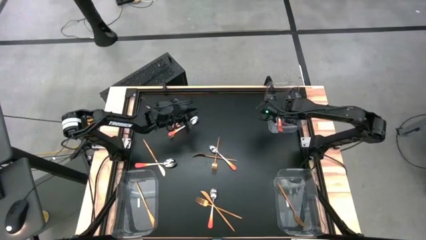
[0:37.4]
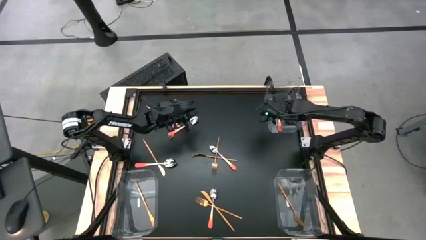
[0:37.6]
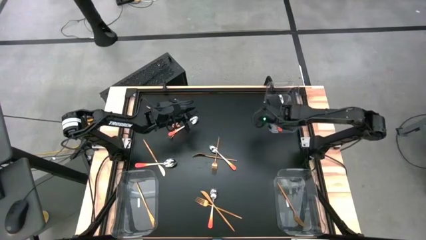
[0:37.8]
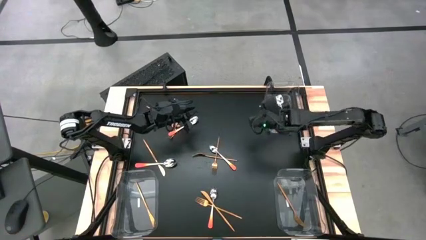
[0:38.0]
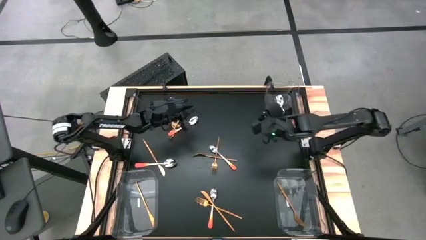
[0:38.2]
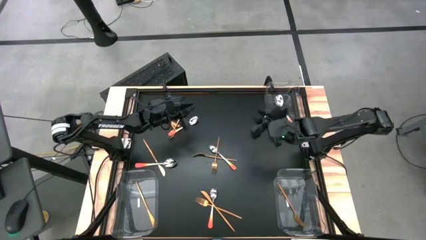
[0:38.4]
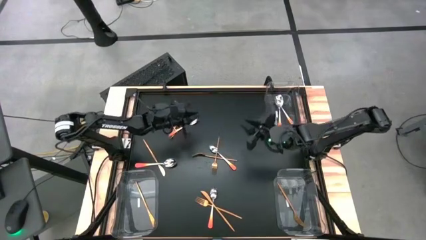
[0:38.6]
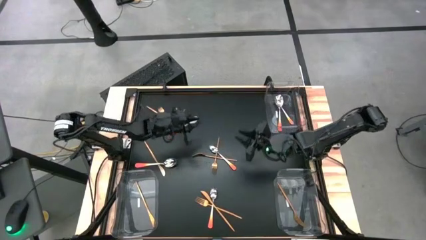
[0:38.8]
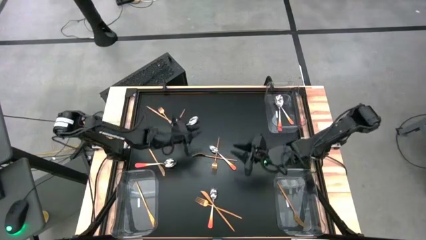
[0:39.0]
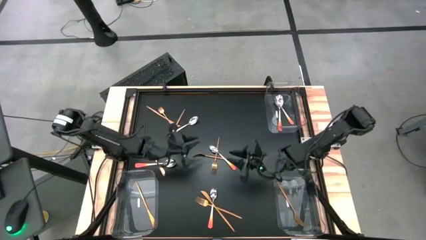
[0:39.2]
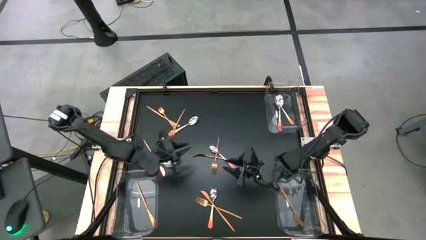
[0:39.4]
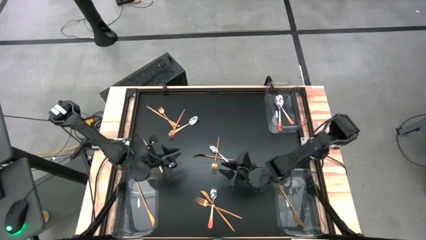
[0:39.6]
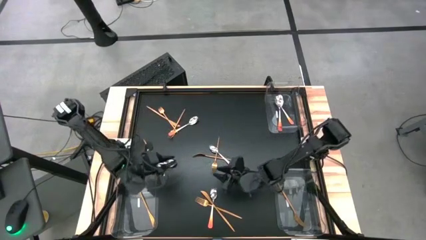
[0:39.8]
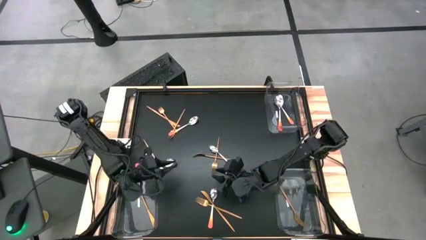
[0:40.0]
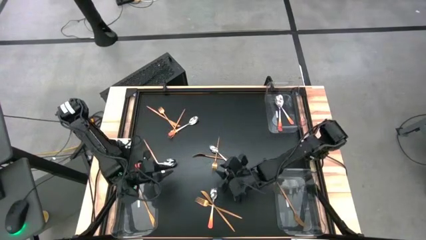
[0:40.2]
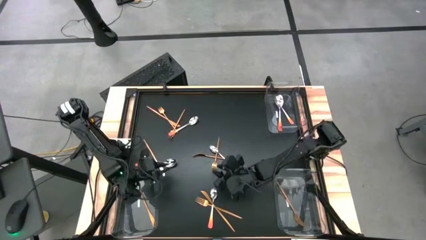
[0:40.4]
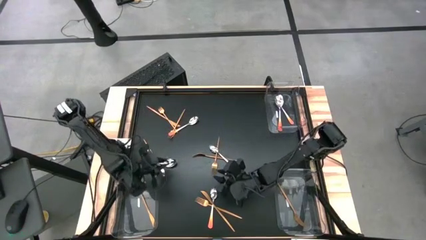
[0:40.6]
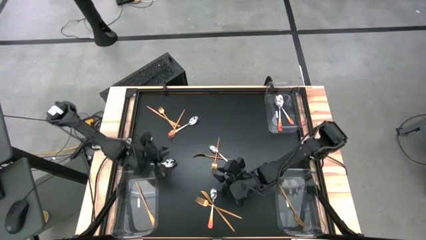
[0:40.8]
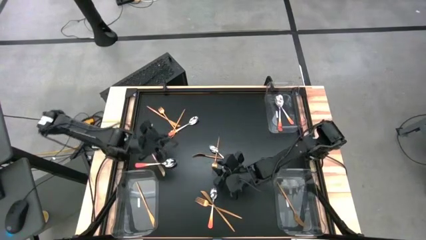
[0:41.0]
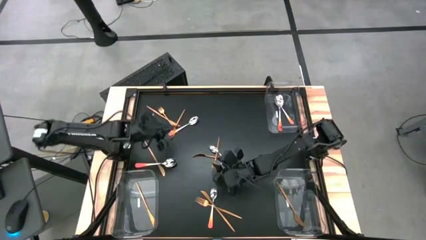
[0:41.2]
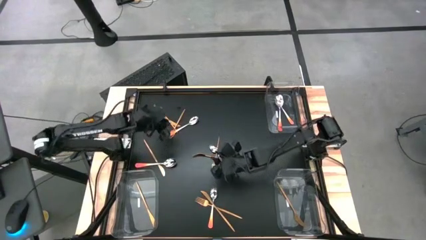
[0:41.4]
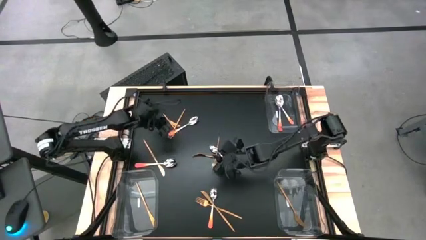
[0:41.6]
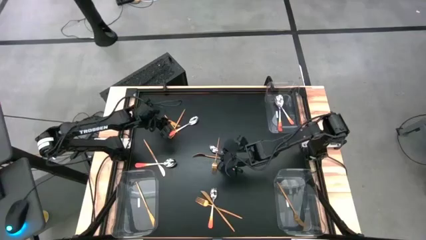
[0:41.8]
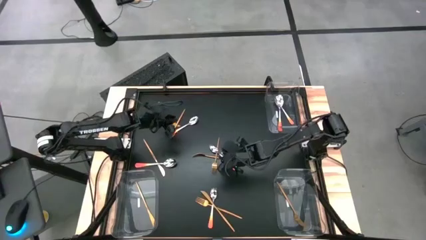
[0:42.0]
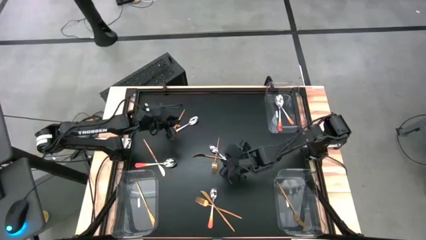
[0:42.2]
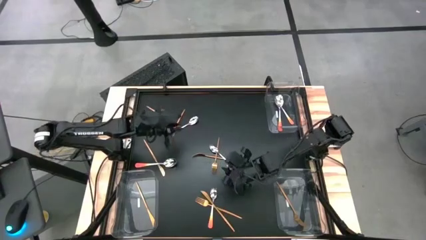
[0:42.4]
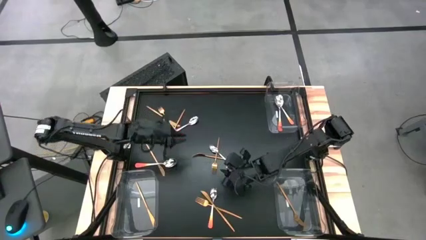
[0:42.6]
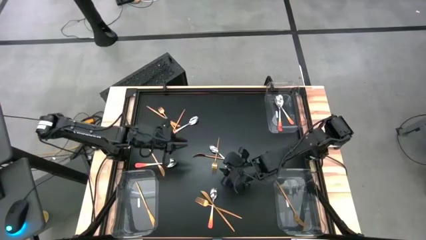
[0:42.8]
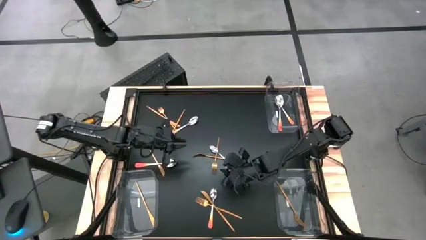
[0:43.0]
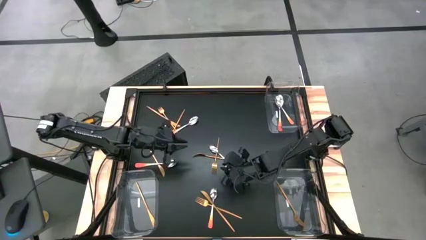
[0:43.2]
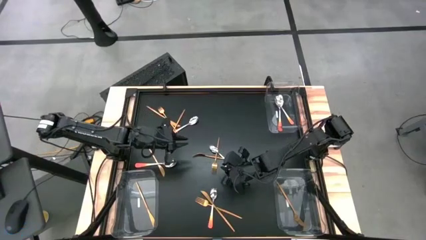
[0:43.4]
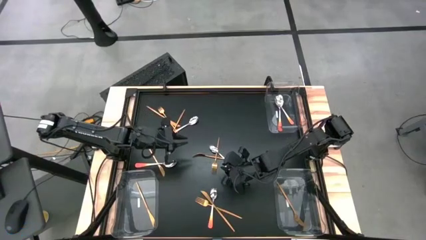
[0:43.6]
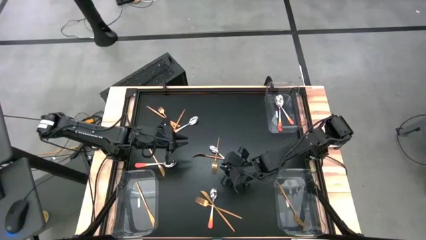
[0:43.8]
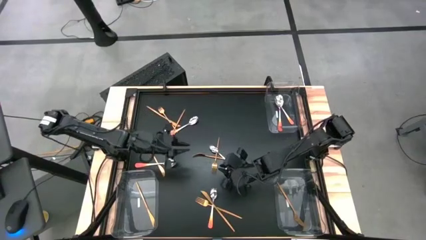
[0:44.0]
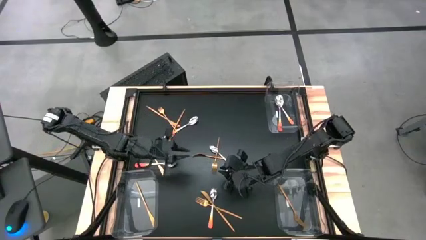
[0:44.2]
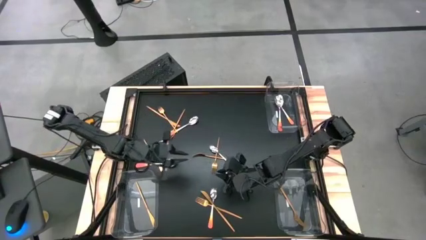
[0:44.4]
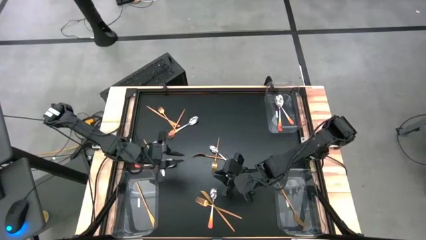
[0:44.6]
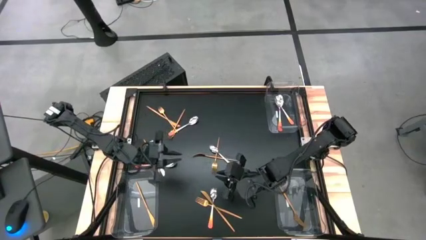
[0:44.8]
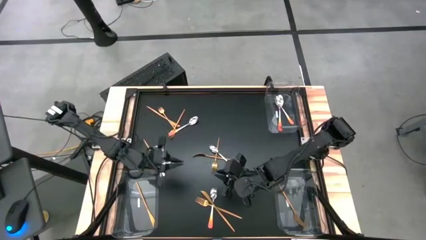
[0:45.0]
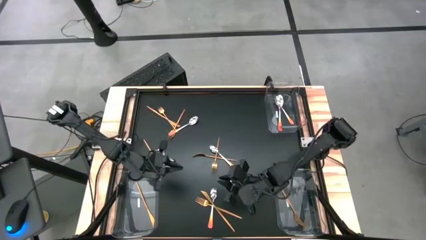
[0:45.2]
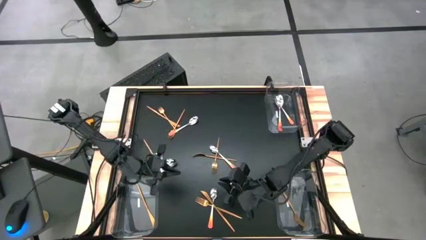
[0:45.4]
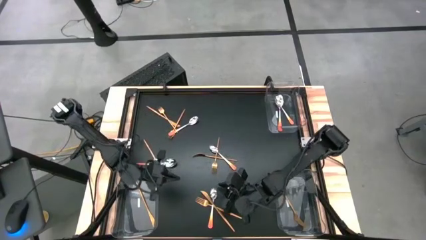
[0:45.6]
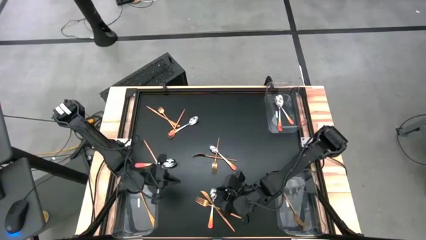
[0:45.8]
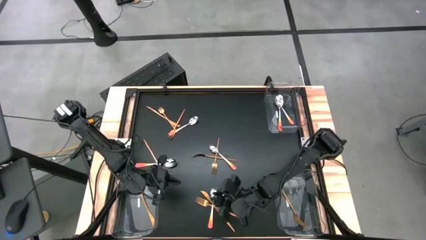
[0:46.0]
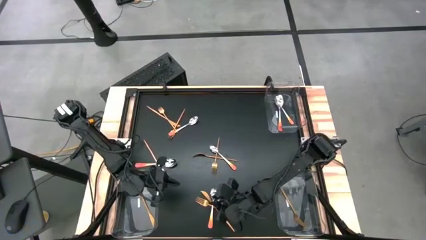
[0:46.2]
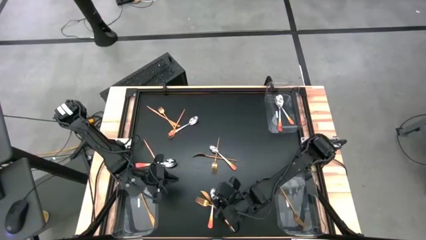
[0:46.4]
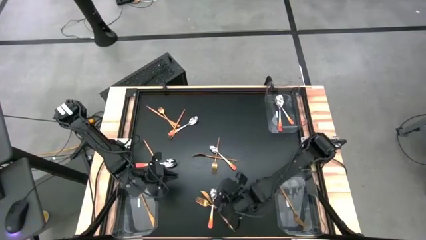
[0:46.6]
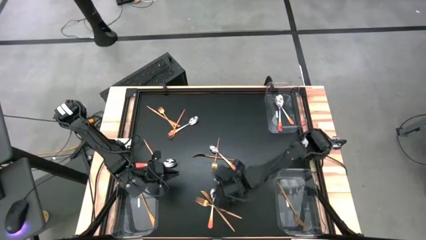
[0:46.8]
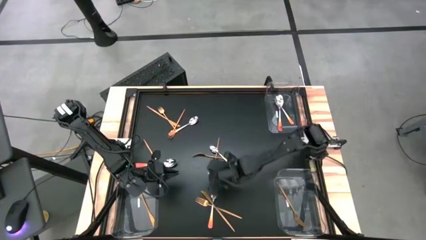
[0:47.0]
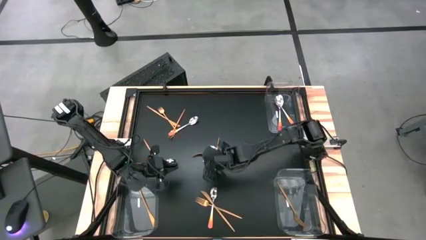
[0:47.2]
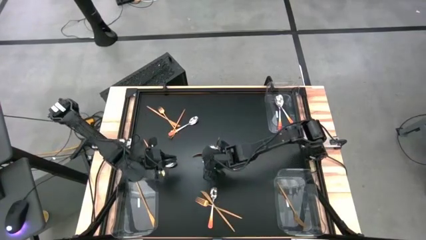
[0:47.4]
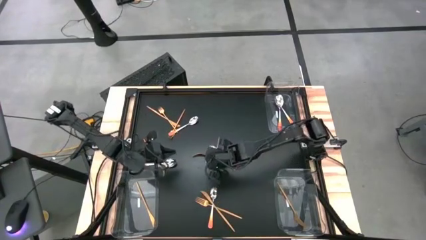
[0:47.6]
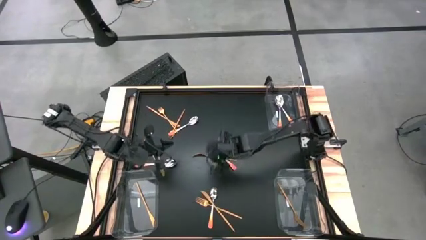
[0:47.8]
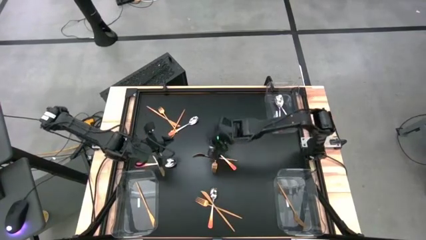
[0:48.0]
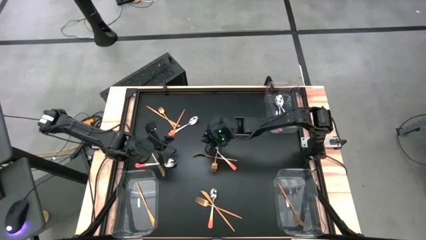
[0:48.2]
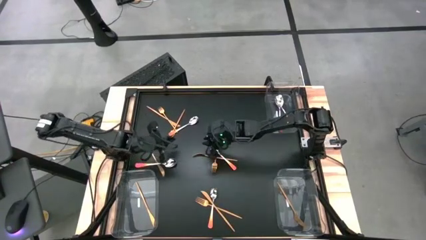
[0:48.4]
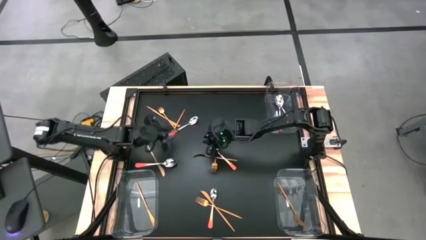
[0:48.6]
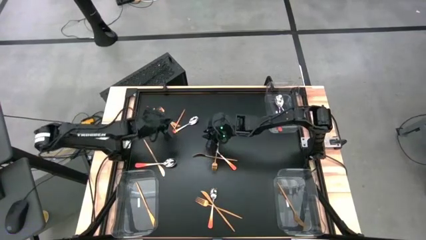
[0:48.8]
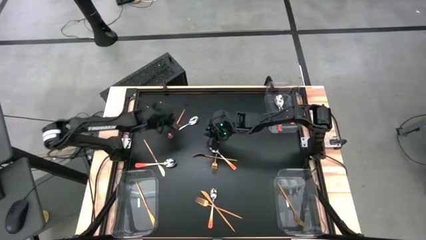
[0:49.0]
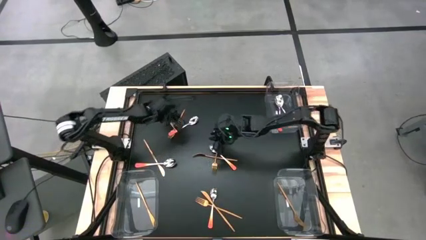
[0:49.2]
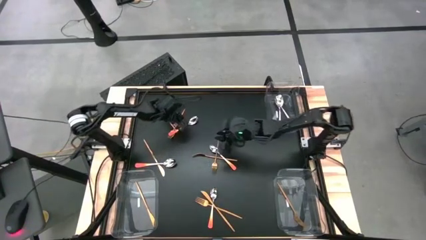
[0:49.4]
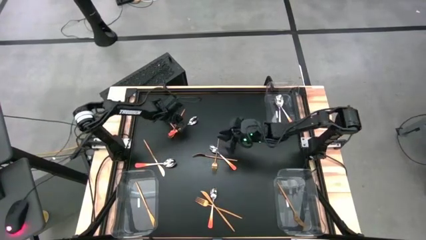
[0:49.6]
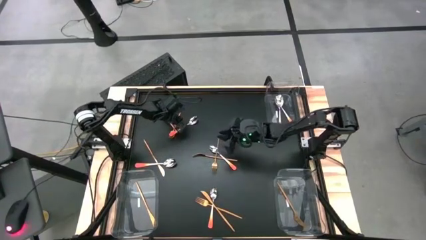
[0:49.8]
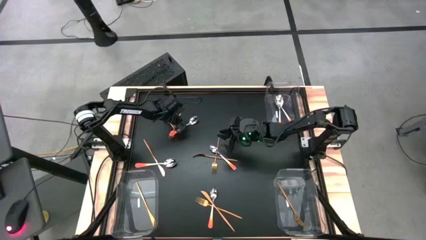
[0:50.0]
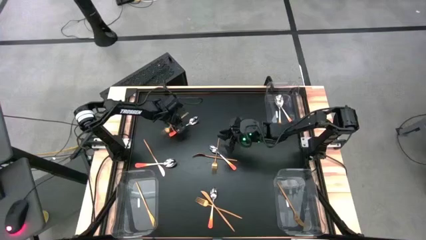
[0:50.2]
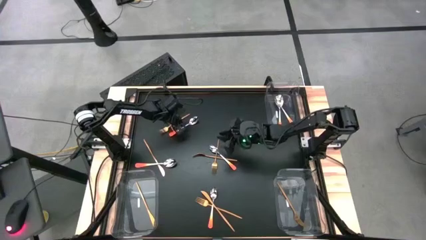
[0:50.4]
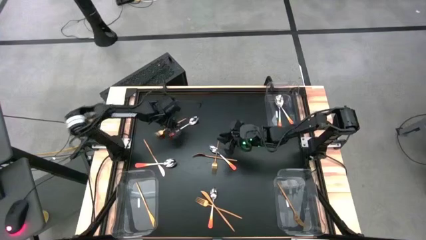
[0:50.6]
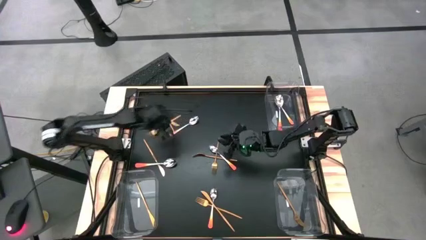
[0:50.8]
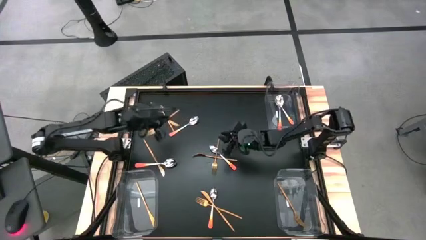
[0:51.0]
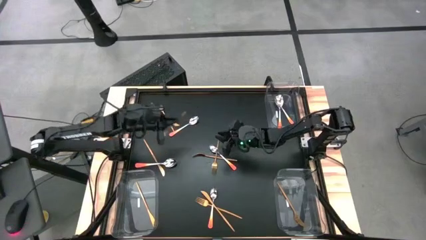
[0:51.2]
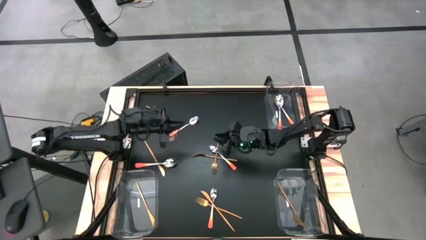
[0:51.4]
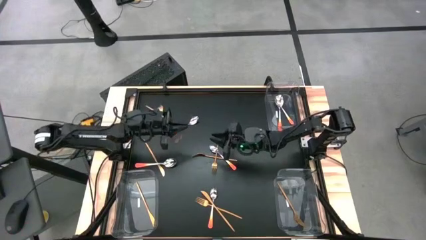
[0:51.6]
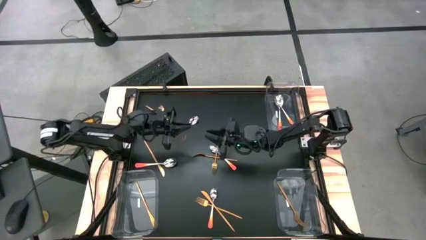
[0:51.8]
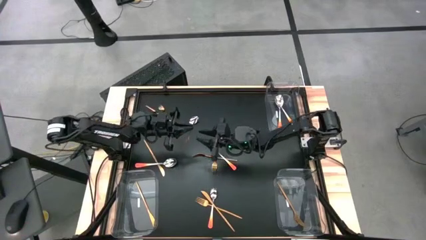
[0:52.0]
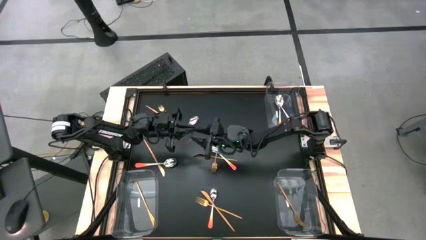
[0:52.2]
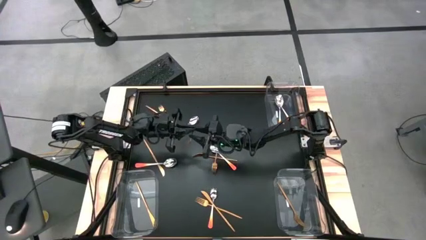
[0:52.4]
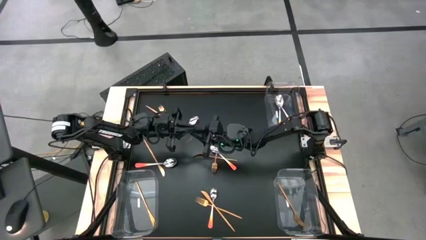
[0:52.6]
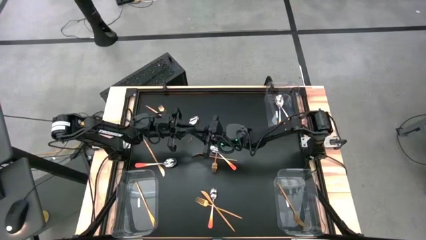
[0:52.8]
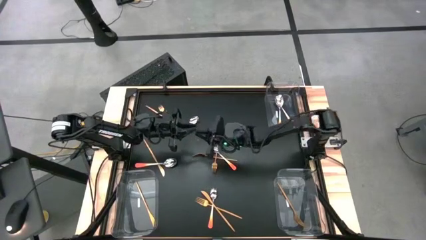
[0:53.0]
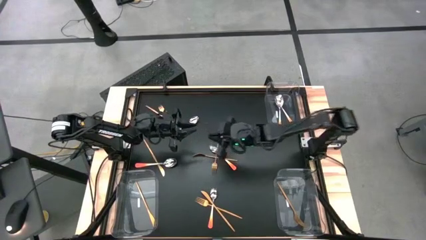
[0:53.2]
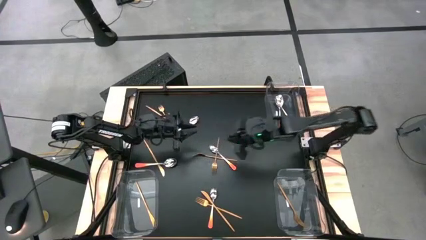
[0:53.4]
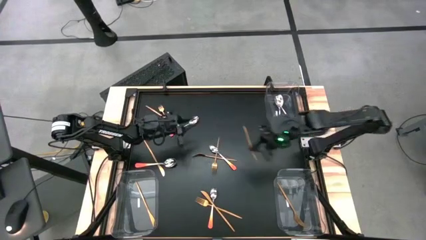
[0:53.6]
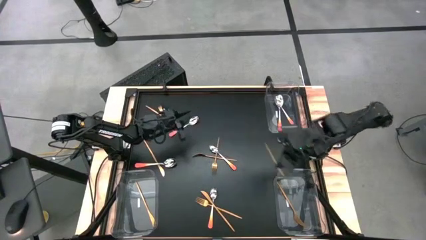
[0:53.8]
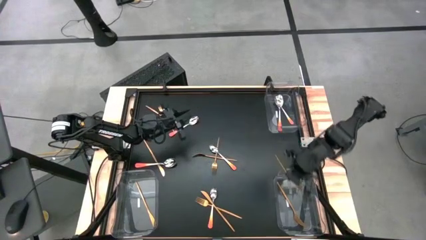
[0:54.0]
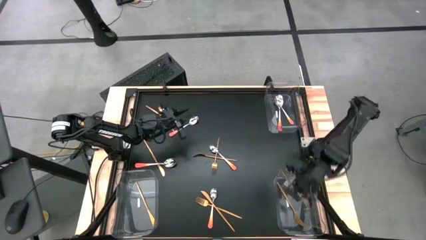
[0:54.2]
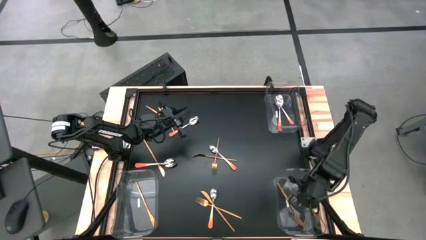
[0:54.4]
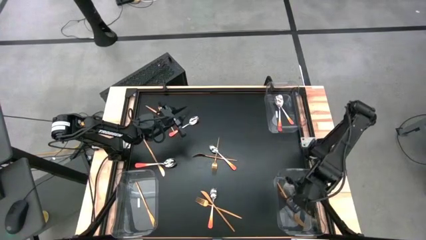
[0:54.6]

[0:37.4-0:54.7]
Task: Sort silverware by color (type)
Put the gold fork into the bottom right transparent bin
